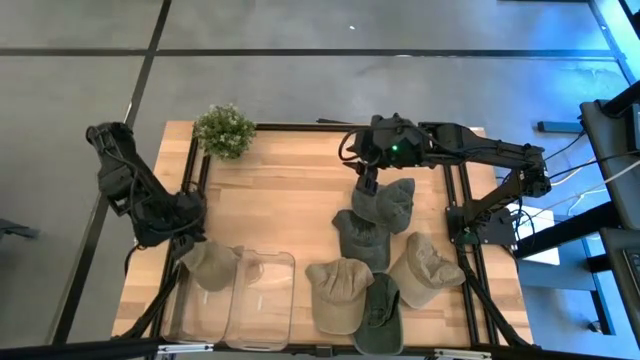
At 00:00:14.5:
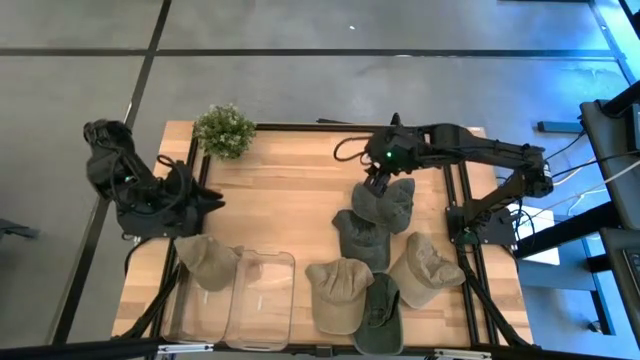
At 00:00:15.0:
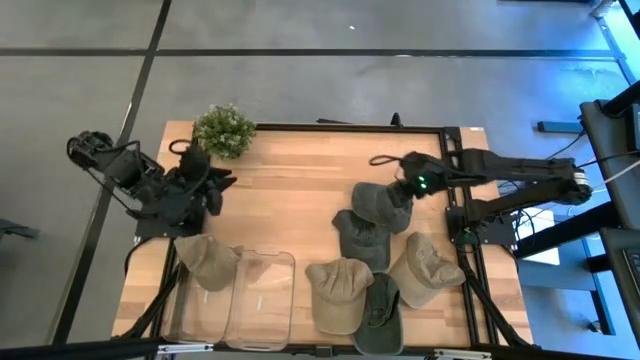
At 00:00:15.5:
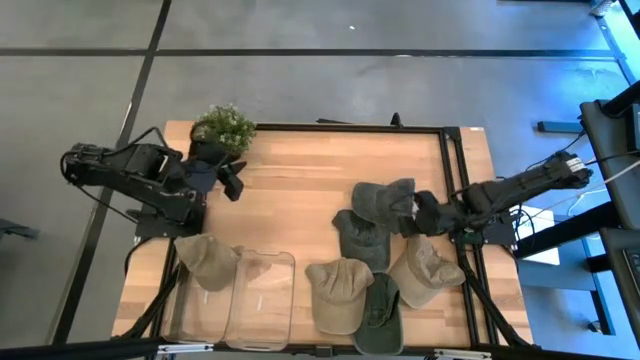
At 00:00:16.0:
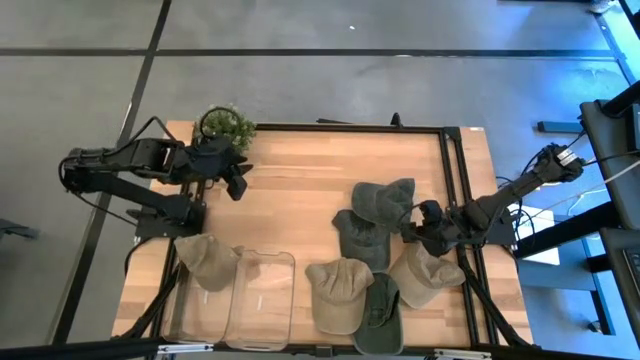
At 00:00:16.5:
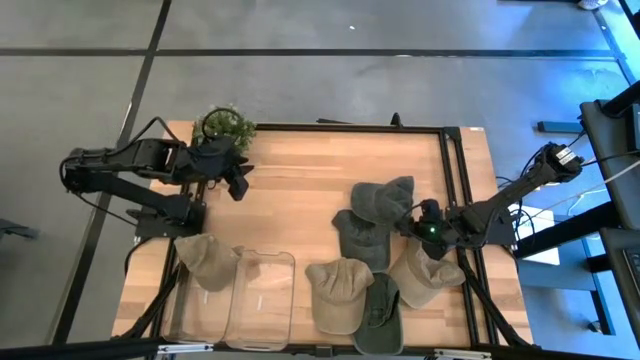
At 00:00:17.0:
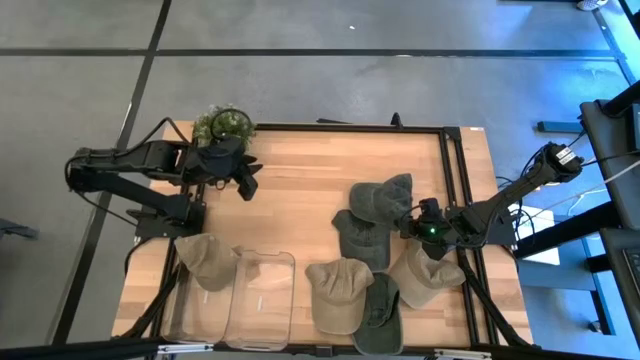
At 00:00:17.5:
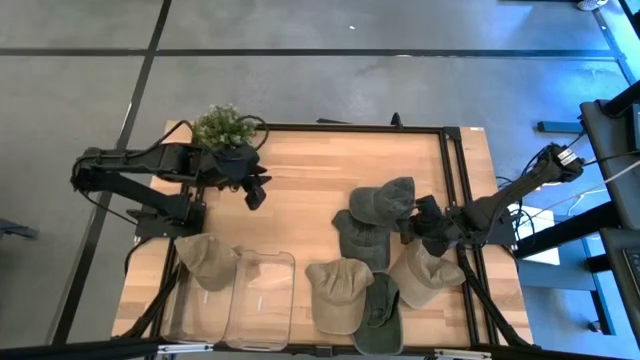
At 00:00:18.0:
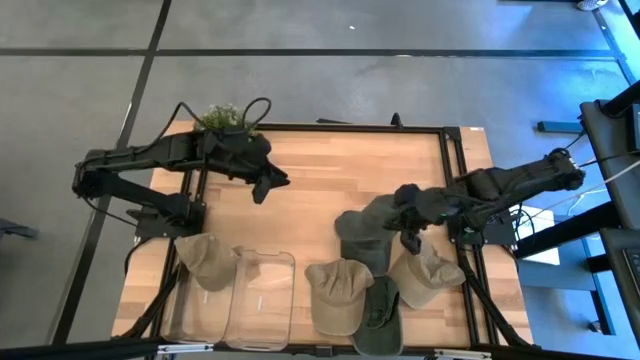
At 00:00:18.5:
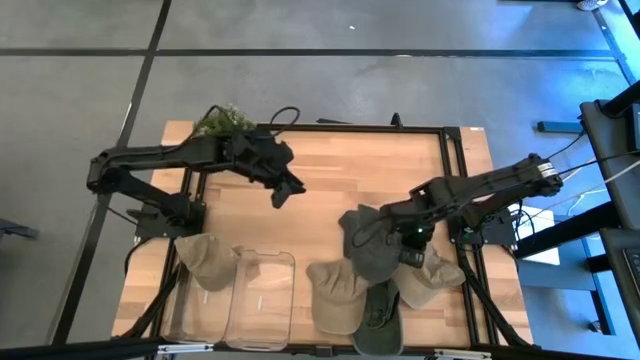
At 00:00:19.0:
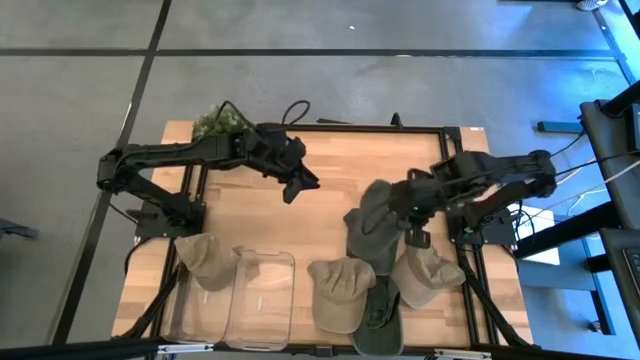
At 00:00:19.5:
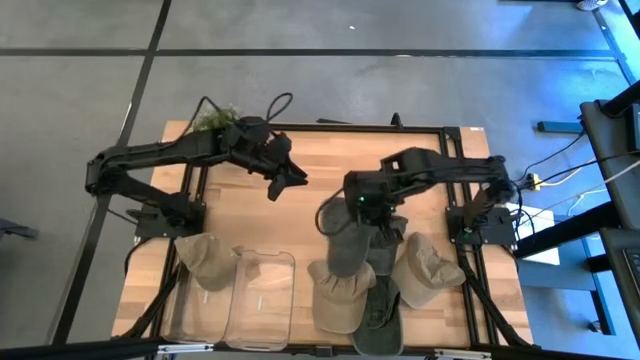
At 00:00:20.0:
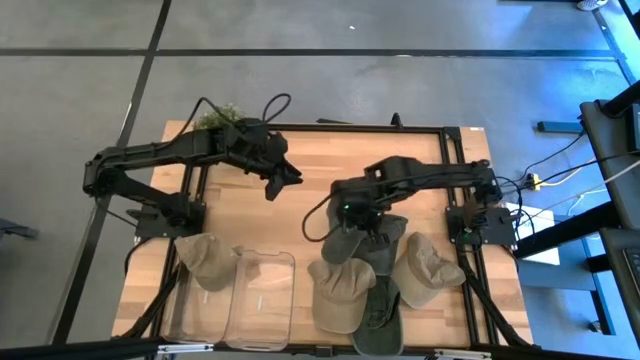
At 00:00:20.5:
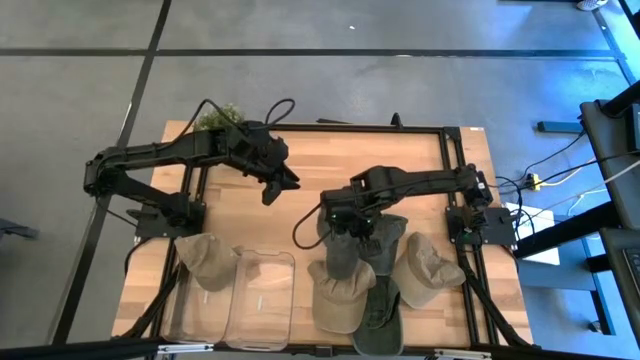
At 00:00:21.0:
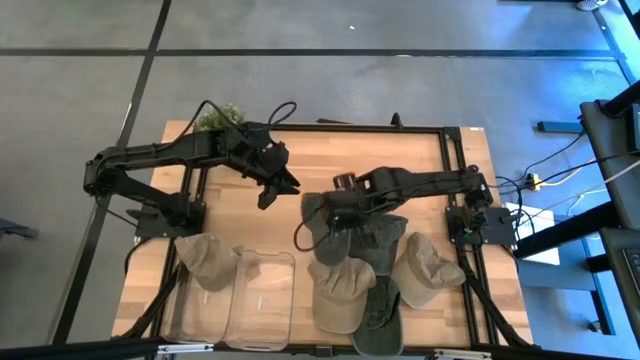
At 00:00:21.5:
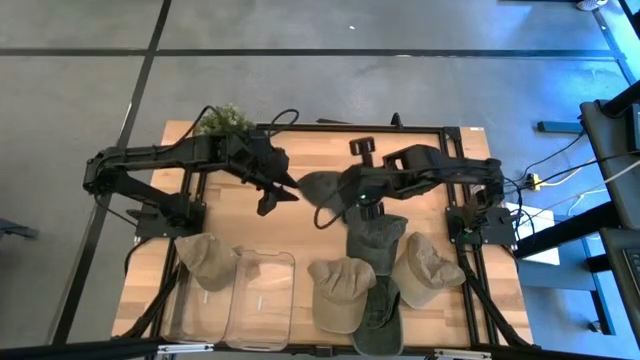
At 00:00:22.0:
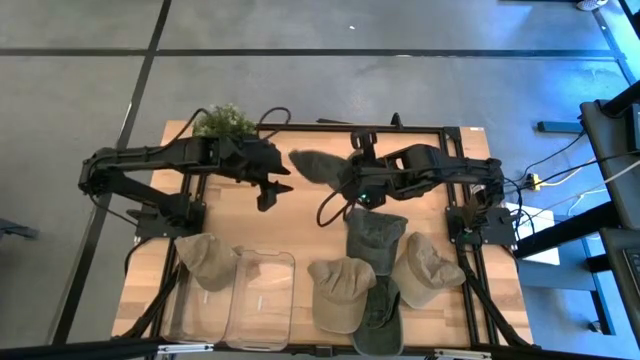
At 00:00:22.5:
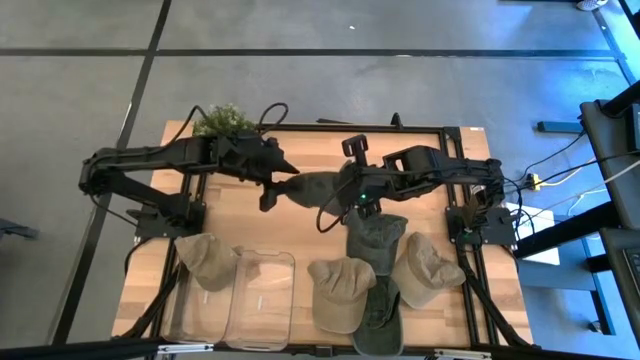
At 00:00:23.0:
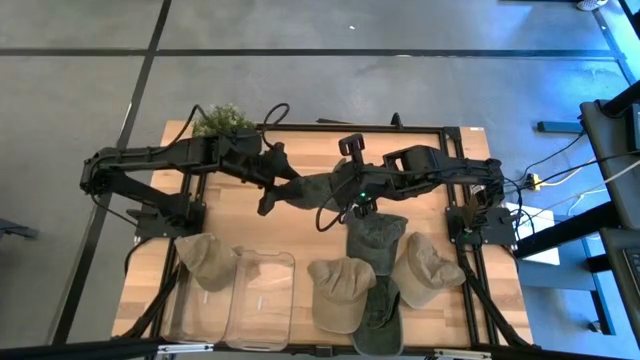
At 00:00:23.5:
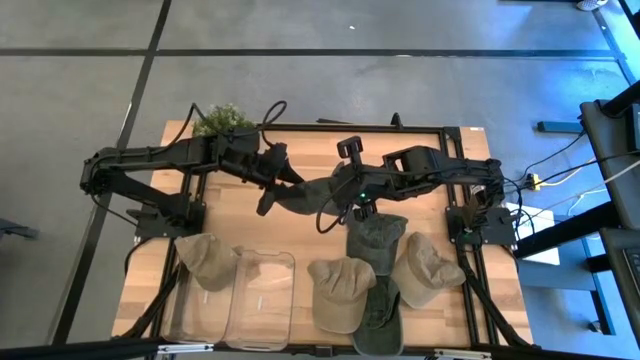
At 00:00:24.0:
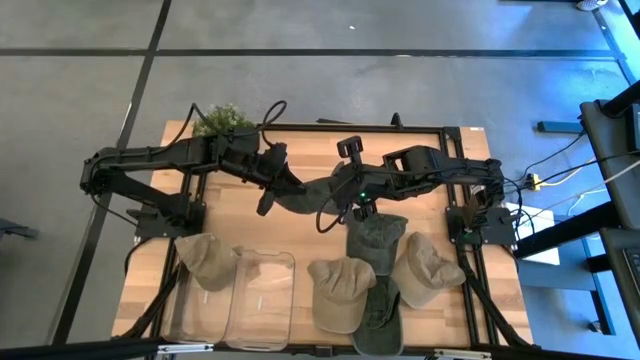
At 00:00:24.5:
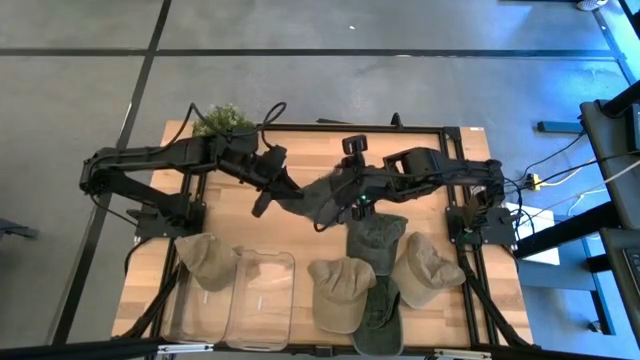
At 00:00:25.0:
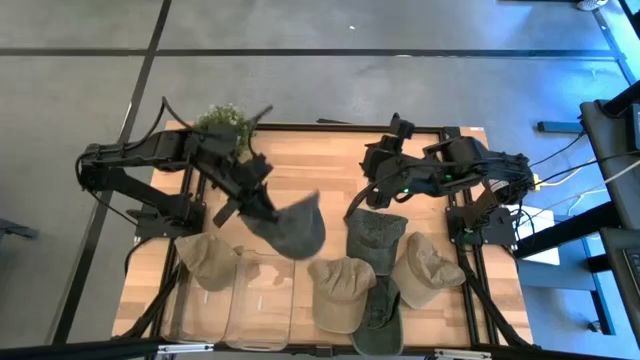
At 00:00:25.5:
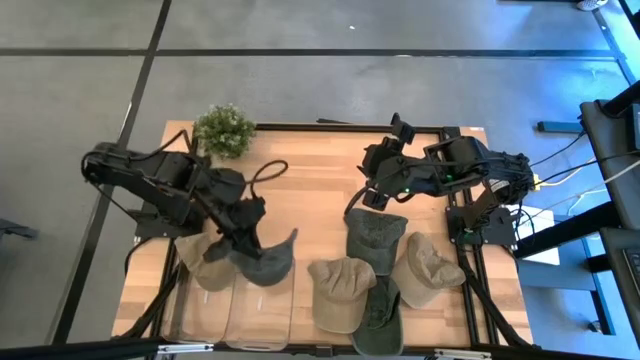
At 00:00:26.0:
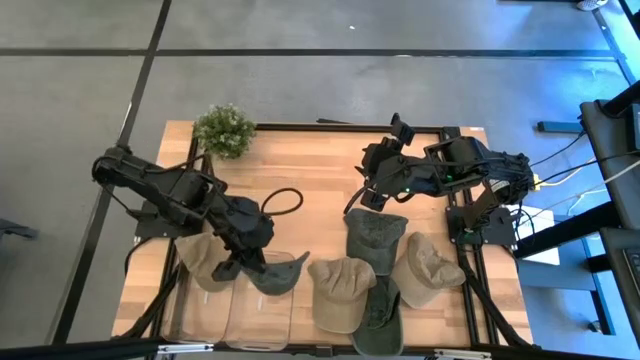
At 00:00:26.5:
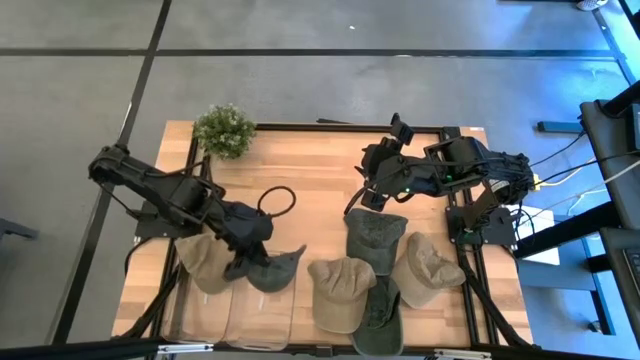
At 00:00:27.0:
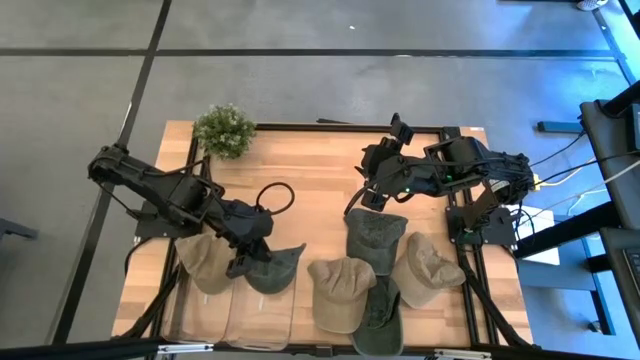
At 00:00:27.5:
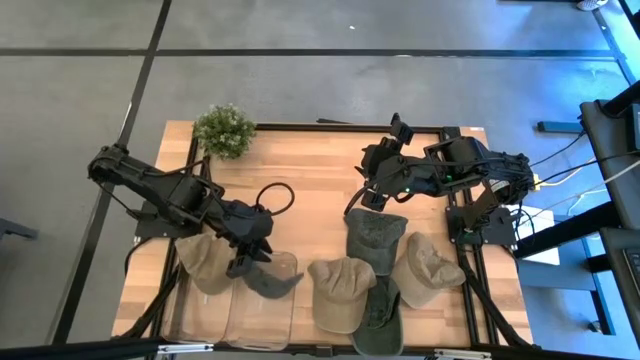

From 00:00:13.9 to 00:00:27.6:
Task: Pick & Place hat
Put the top black cap into the right transparent bin

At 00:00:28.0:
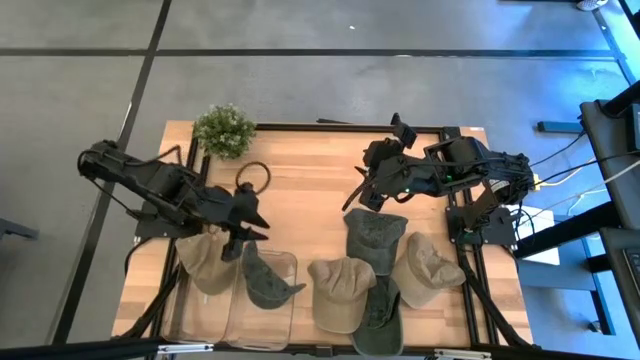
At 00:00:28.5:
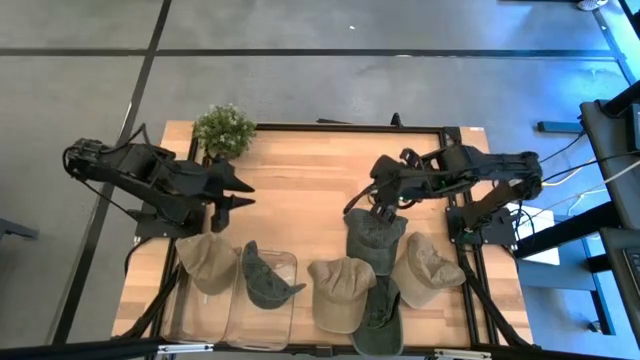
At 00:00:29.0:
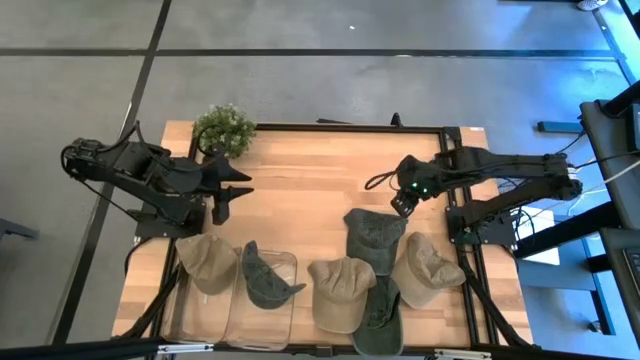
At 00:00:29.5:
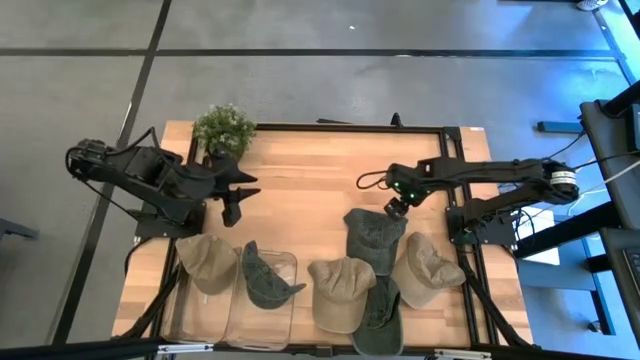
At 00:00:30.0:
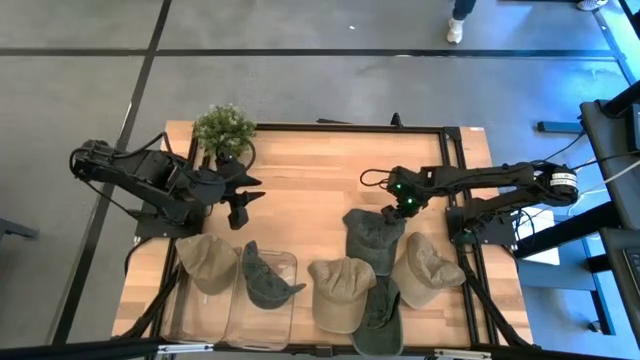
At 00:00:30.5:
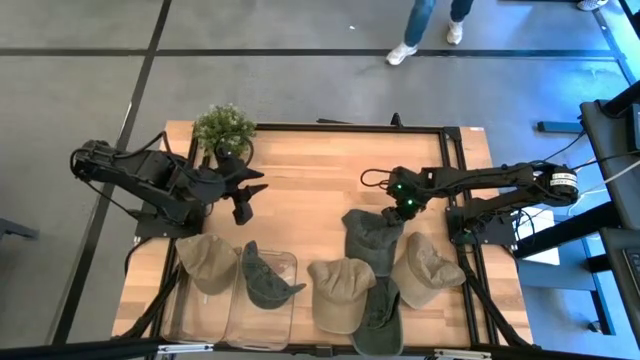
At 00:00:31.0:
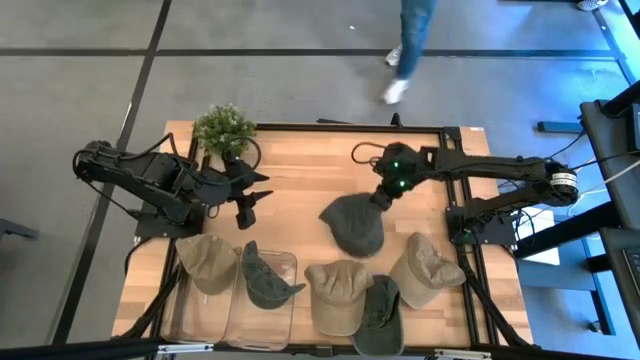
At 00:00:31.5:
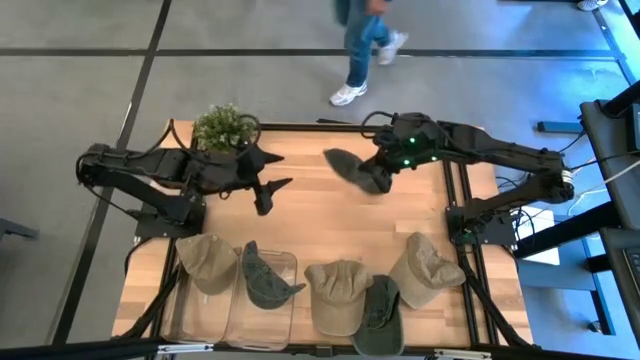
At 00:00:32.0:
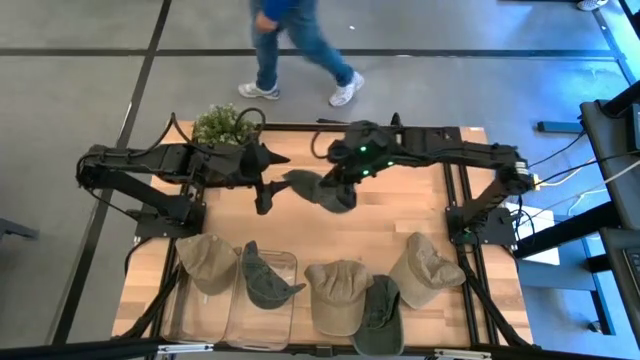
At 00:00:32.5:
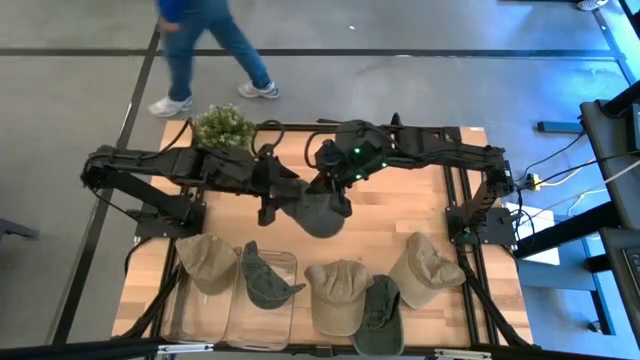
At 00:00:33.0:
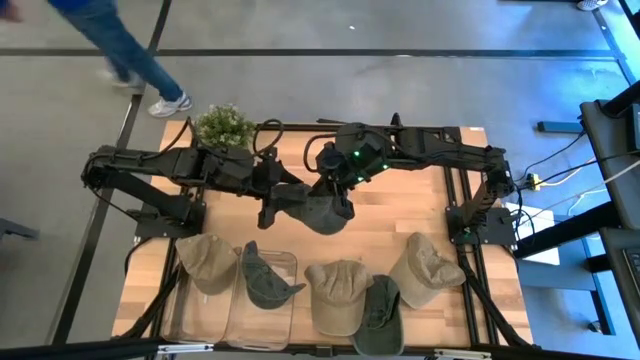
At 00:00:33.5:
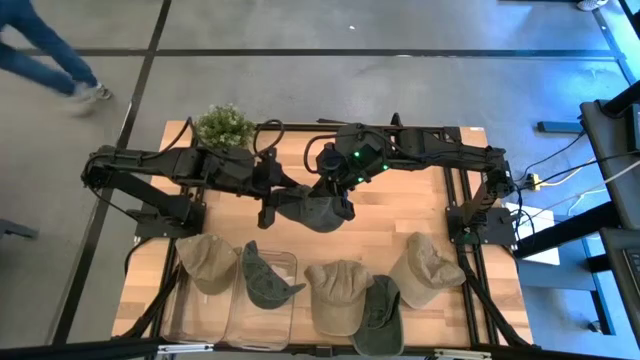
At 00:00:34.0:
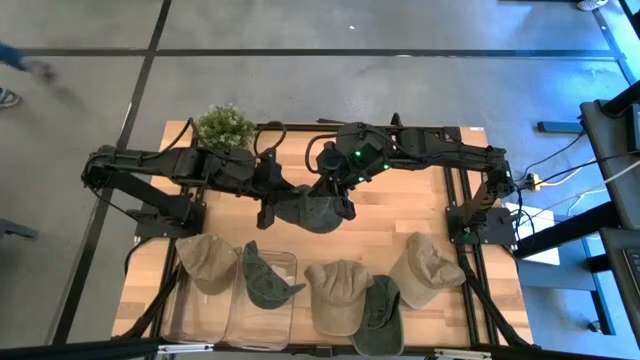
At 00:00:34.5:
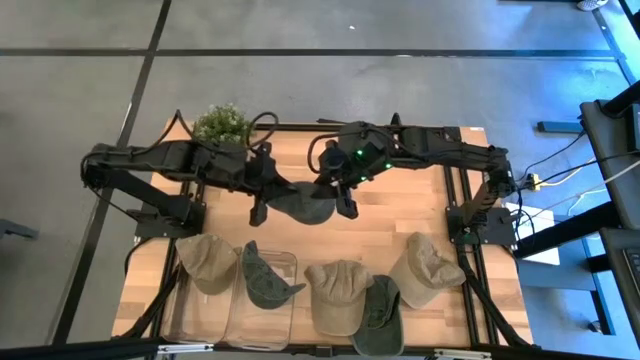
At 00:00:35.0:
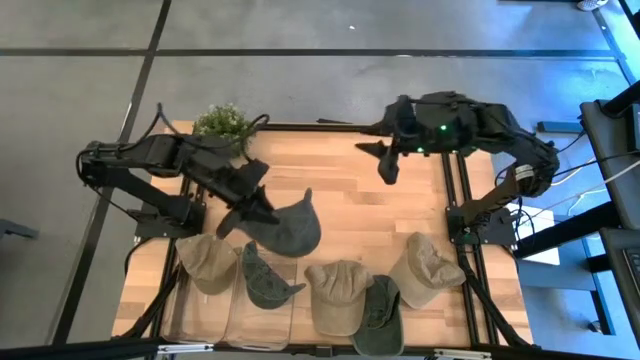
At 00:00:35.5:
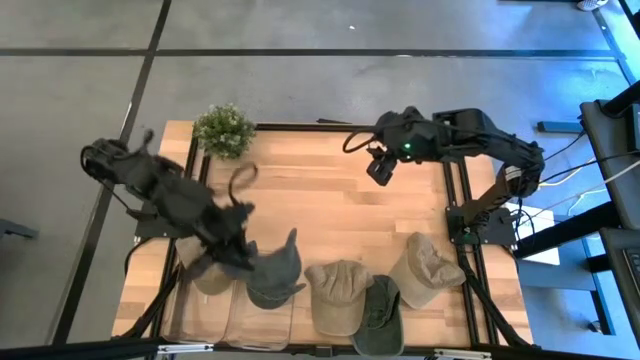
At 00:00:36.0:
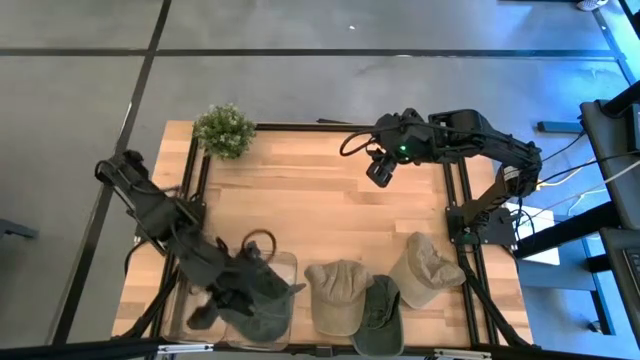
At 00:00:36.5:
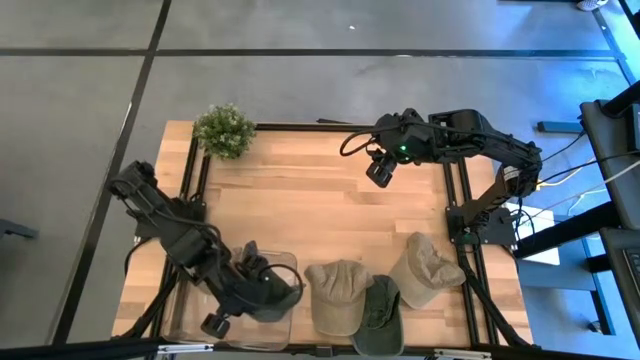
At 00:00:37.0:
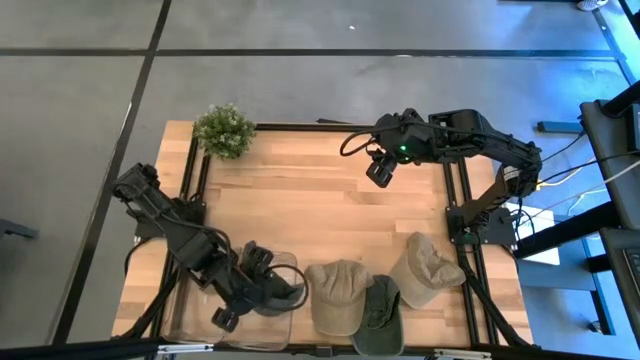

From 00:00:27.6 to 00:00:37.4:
Put the top black cap into the right transparent bin
